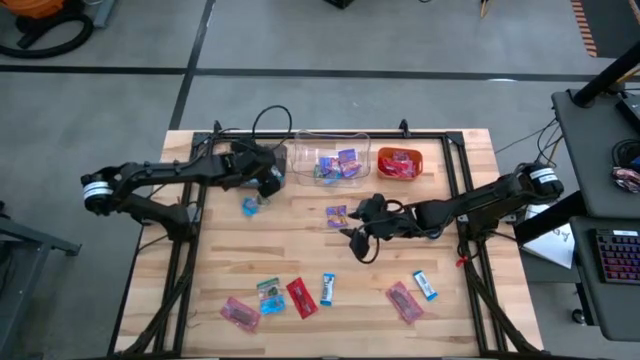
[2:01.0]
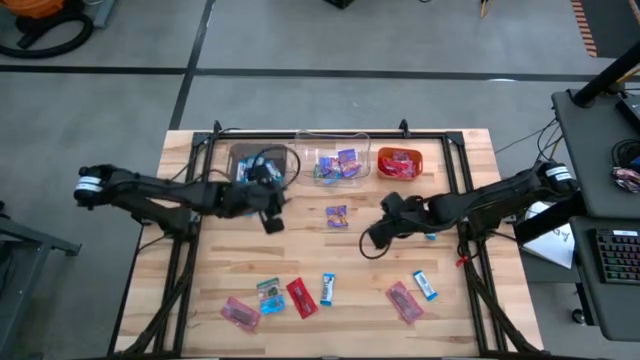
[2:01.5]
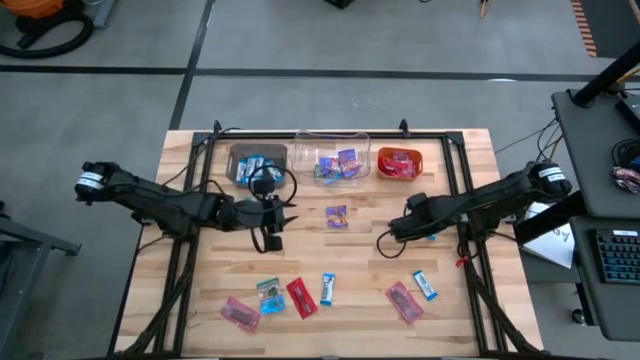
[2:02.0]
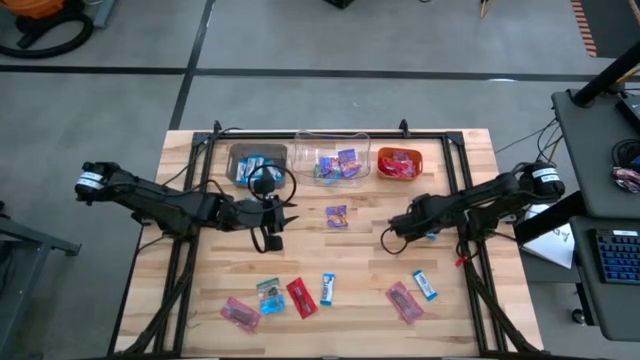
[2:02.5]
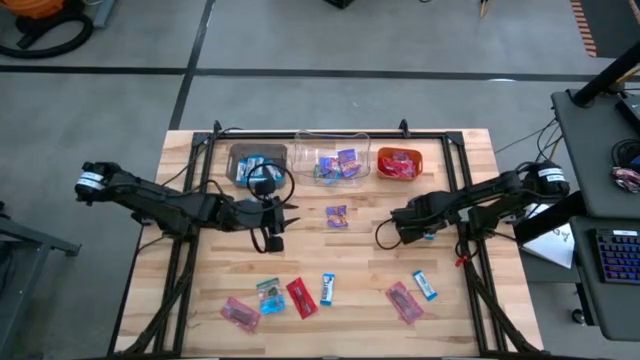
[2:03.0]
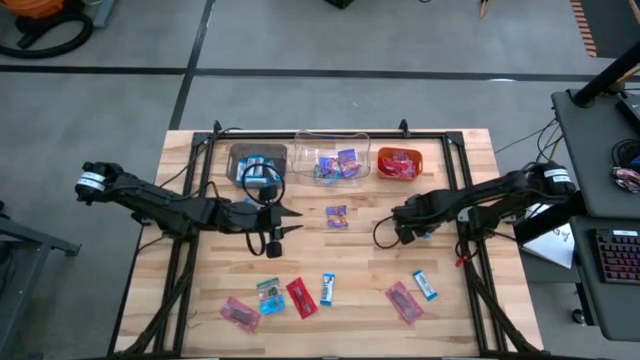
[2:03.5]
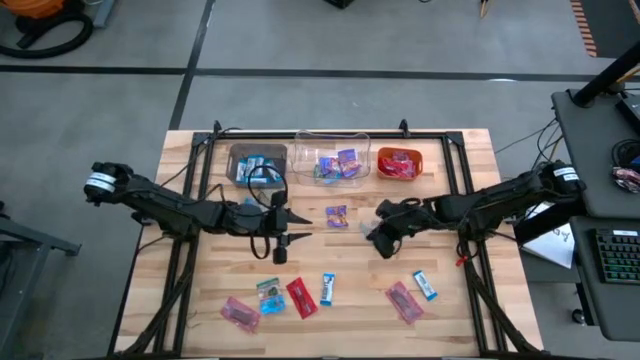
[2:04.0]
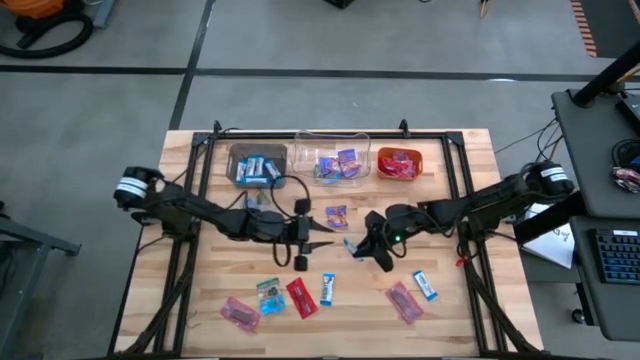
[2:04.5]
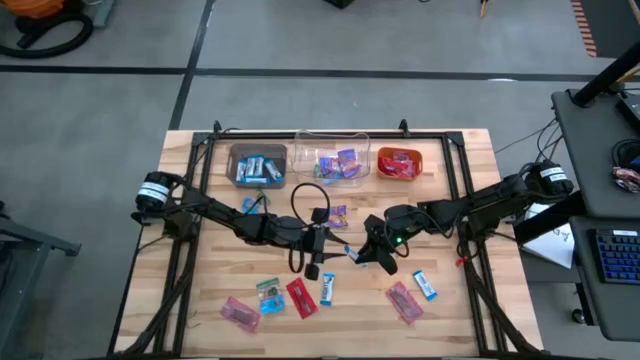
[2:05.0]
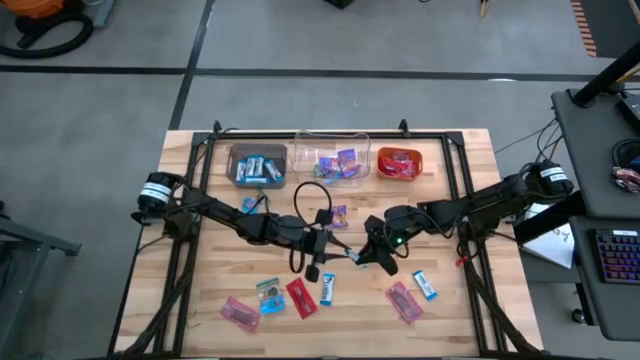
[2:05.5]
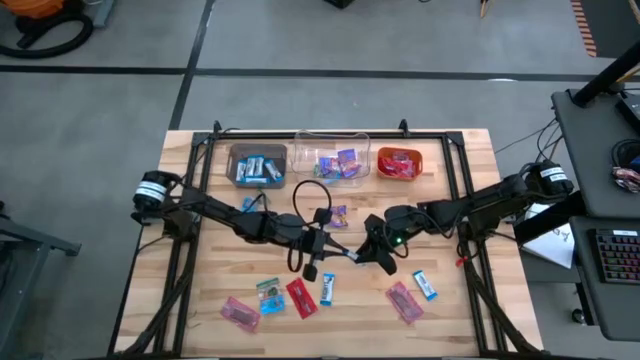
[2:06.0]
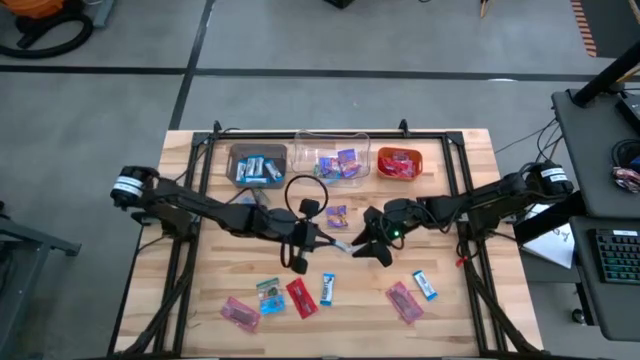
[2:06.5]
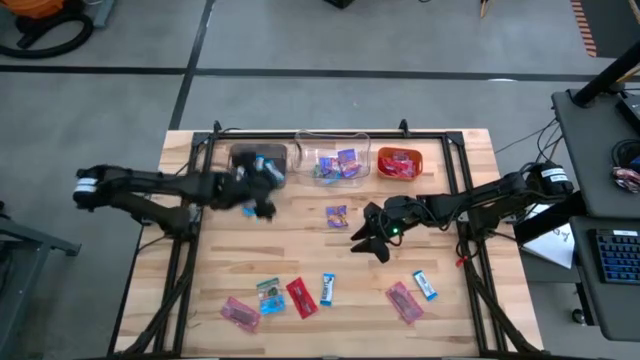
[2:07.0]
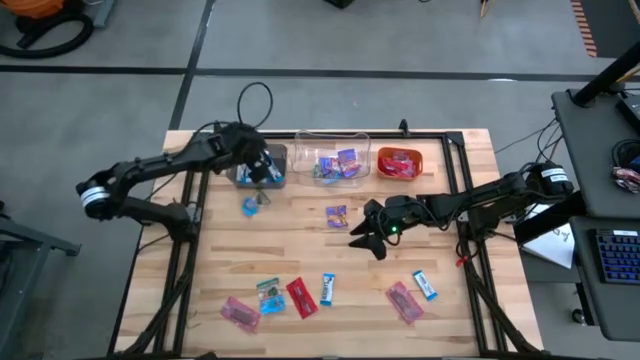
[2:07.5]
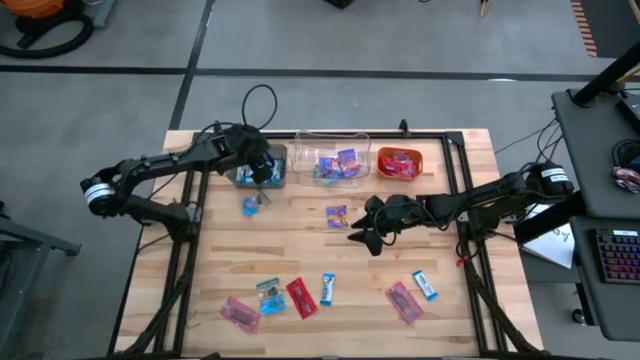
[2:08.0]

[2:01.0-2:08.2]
Task: Sort candy
Put the white candy into the black bin

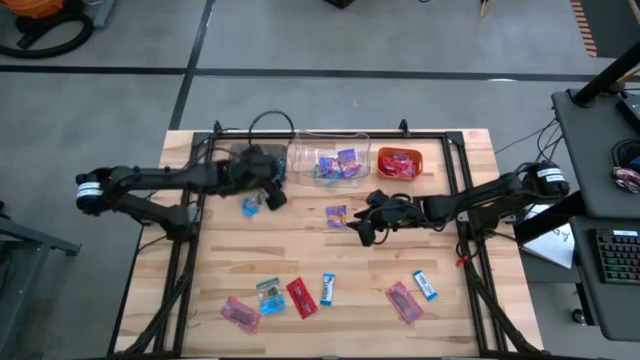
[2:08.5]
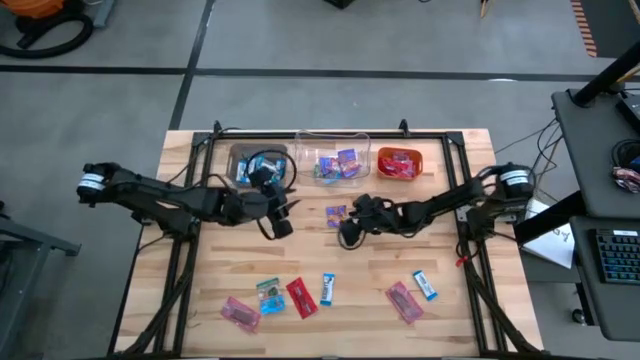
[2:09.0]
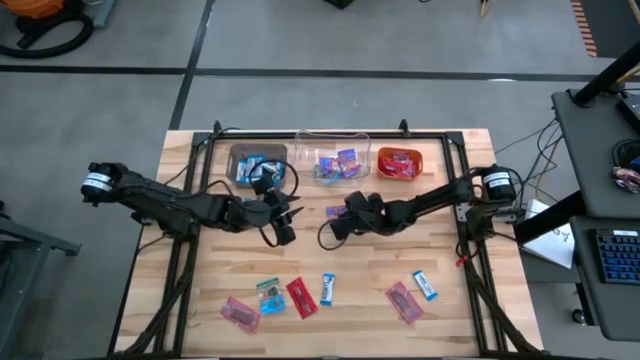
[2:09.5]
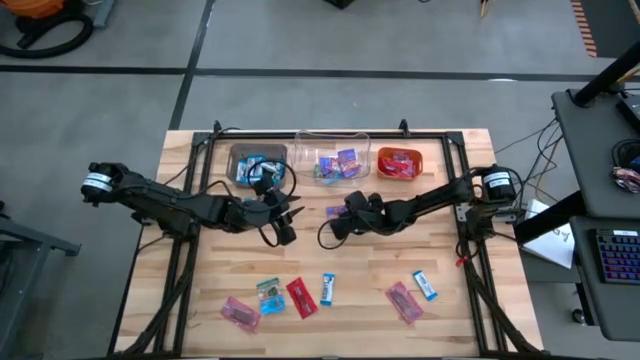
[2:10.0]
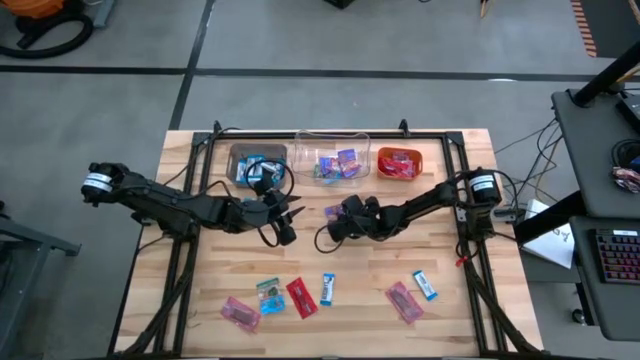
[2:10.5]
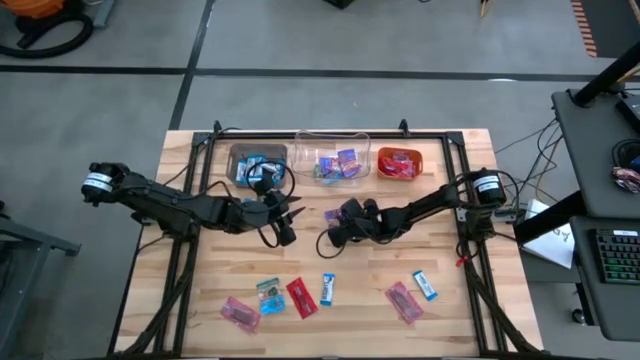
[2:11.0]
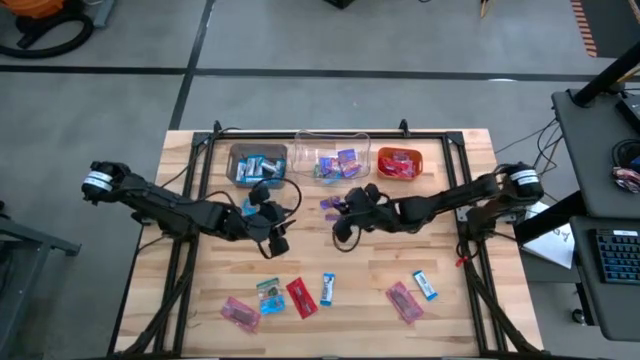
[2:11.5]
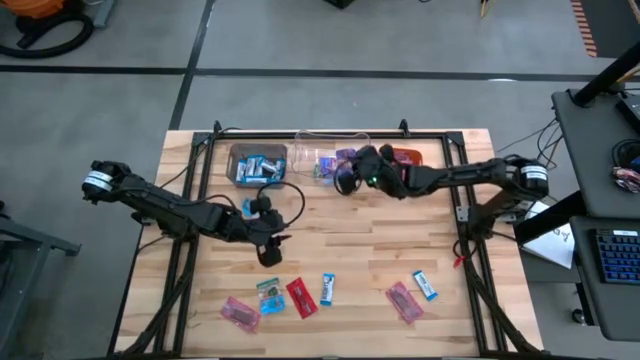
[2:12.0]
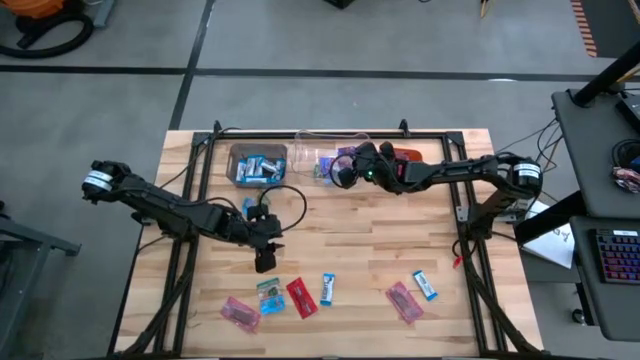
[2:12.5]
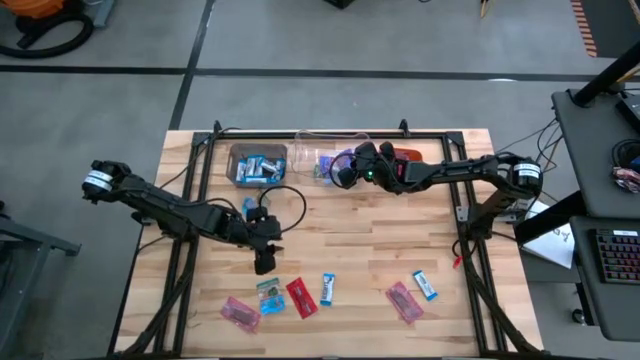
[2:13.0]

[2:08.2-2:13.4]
Put the blue candy into the transparent bin

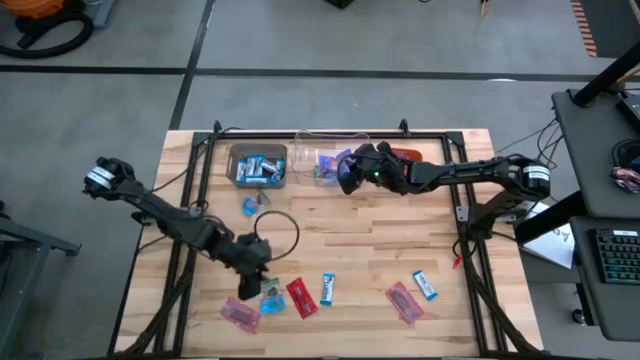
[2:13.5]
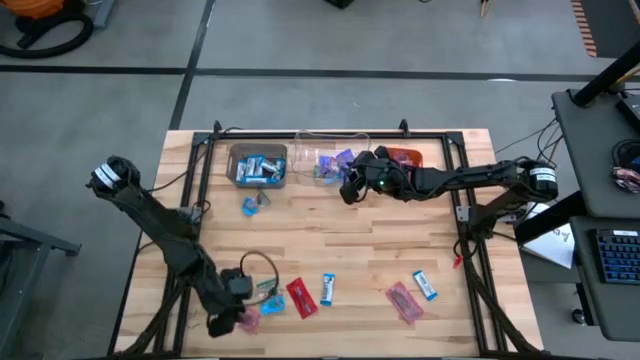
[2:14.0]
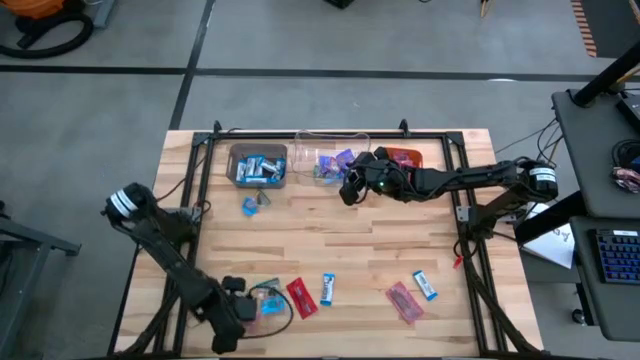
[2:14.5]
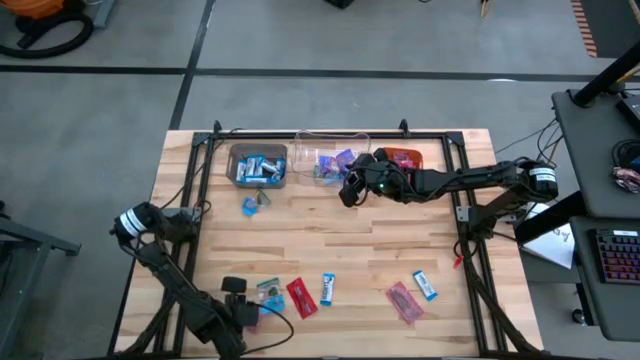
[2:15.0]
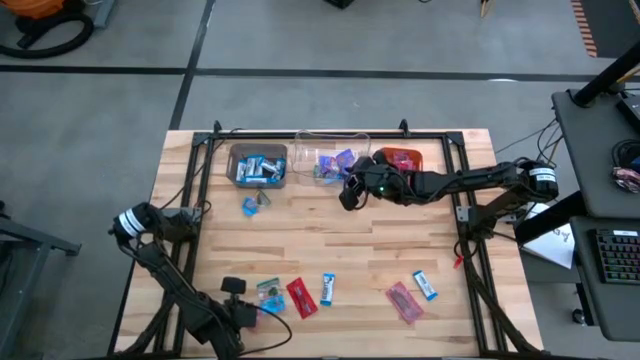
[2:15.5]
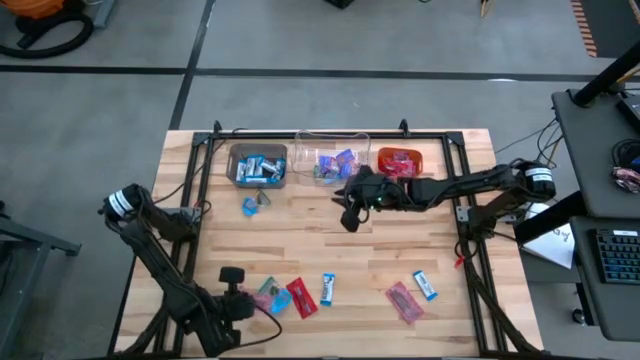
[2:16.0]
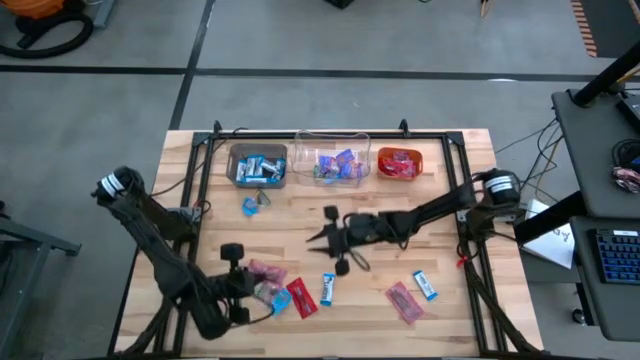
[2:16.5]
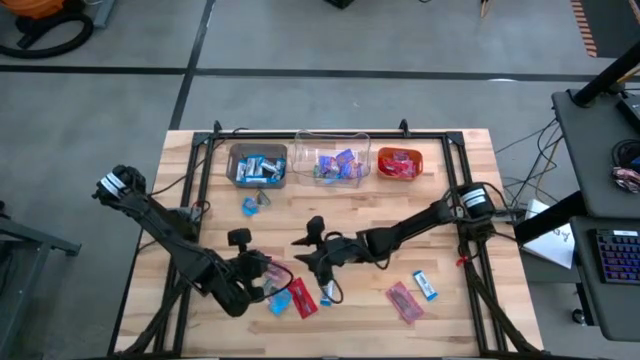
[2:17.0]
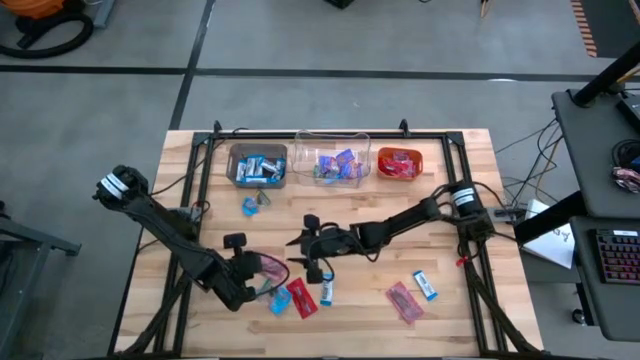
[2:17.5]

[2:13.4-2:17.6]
Put the red candy into the orange bin

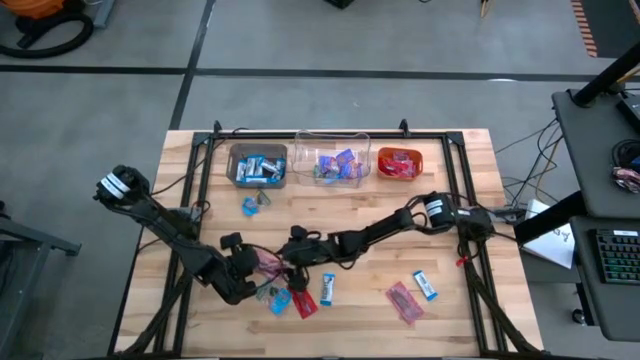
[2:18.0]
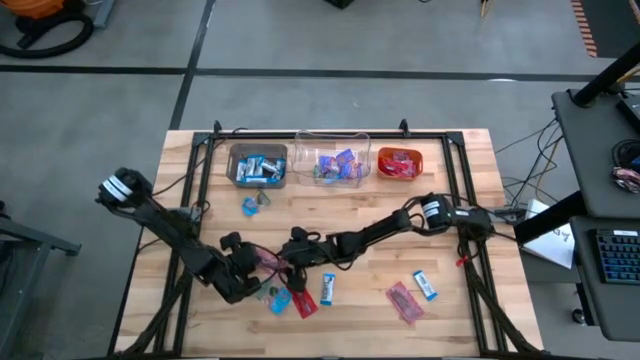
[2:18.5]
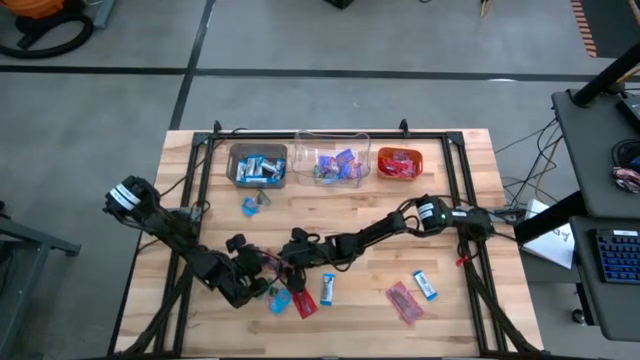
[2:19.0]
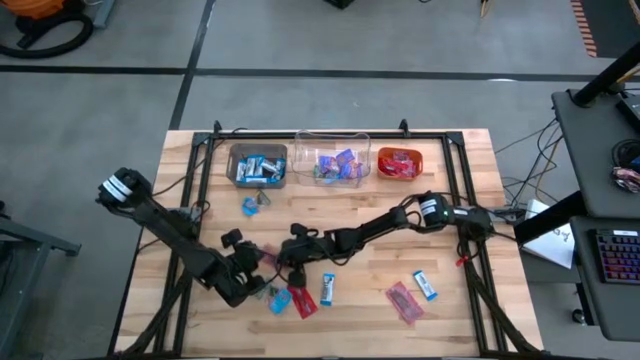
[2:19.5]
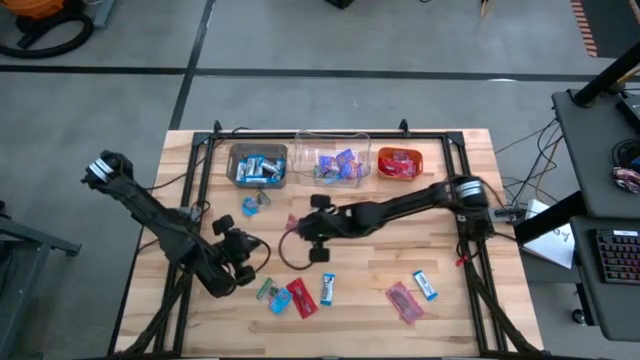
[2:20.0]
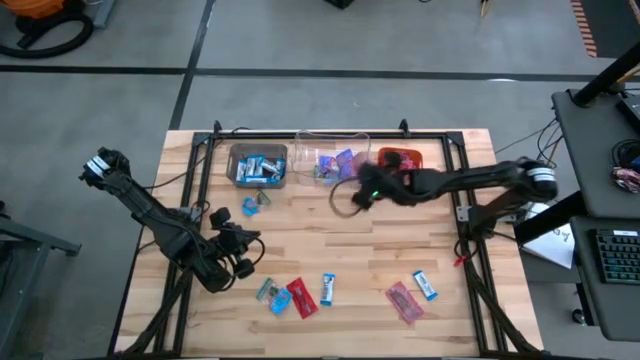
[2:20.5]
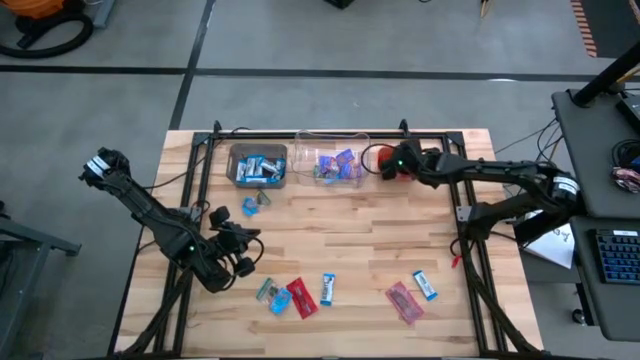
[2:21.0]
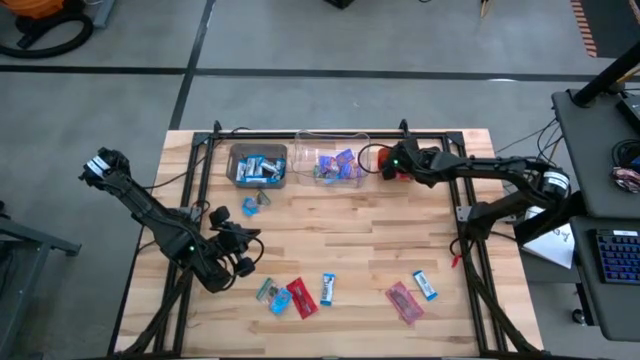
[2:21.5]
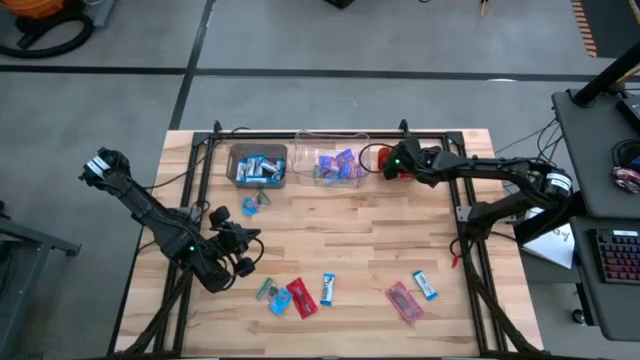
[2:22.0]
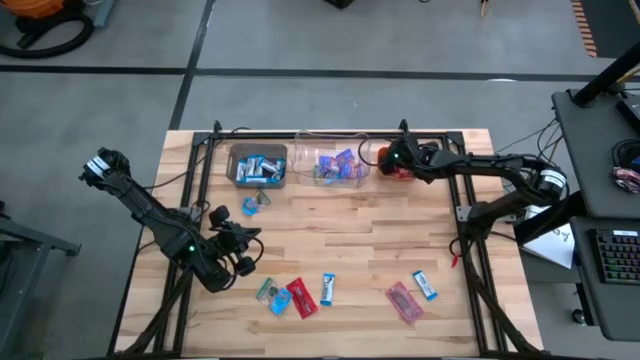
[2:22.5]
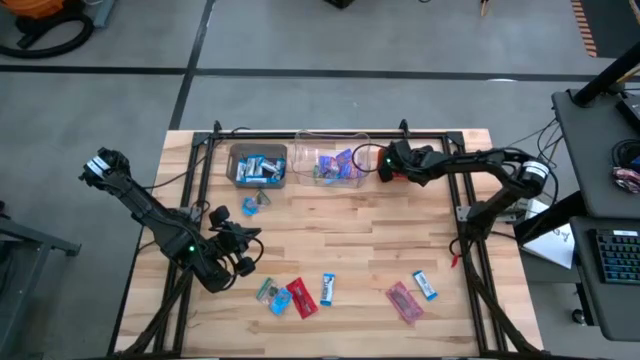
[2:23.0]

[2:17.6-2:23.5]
Put the red candy into the orange bin
